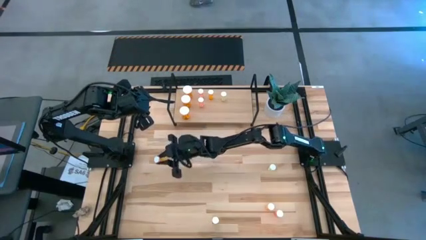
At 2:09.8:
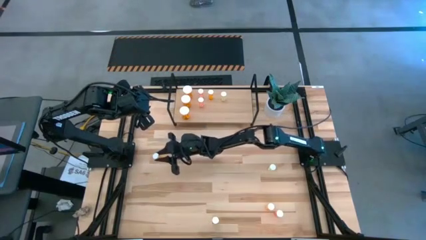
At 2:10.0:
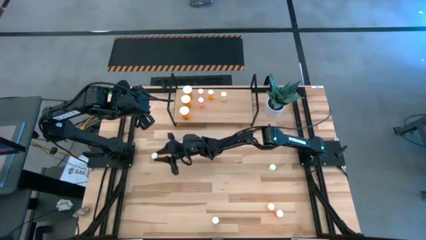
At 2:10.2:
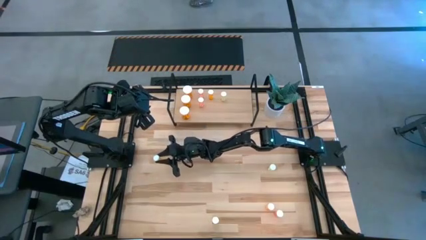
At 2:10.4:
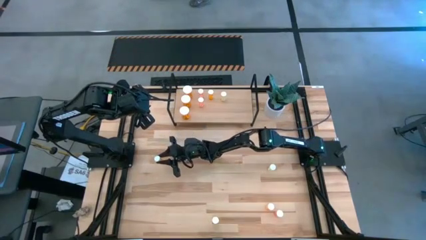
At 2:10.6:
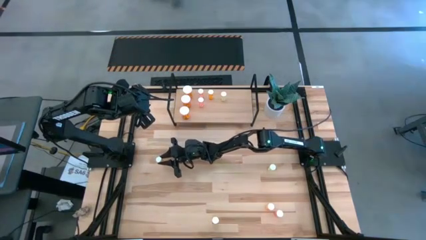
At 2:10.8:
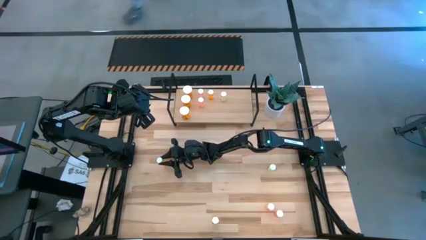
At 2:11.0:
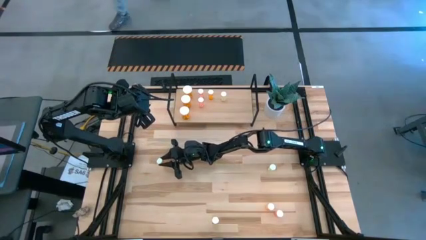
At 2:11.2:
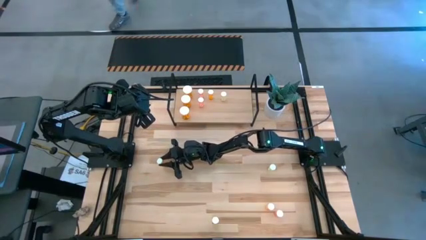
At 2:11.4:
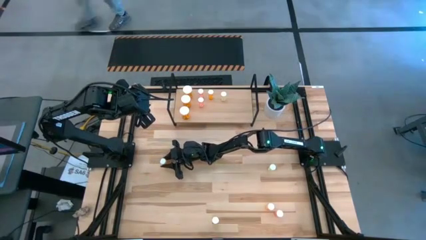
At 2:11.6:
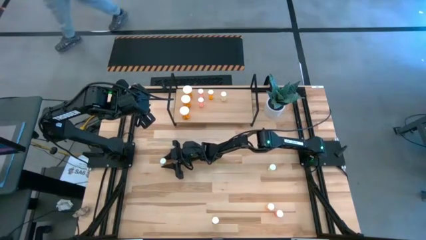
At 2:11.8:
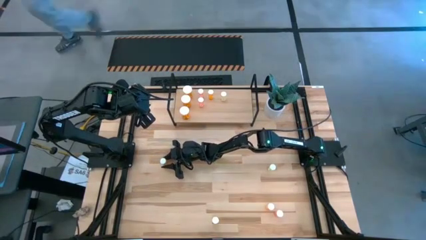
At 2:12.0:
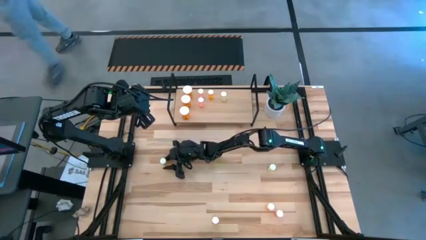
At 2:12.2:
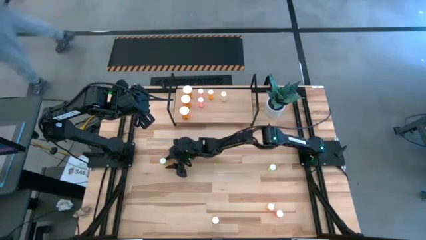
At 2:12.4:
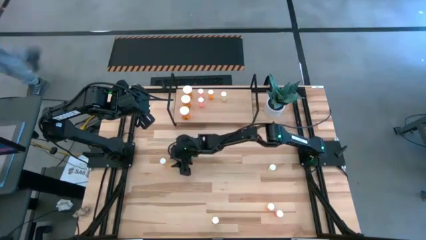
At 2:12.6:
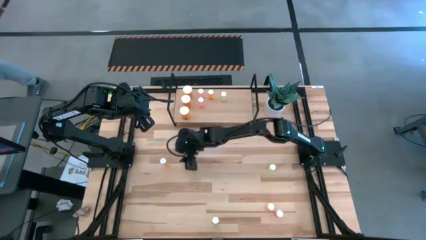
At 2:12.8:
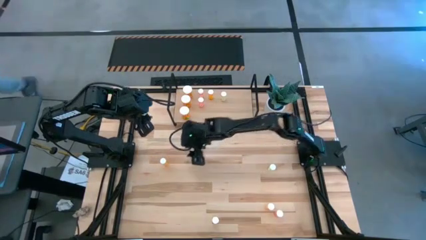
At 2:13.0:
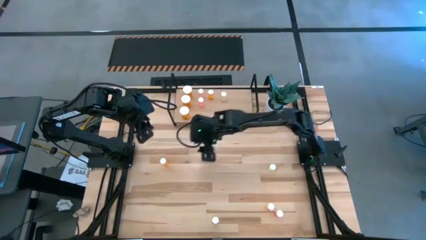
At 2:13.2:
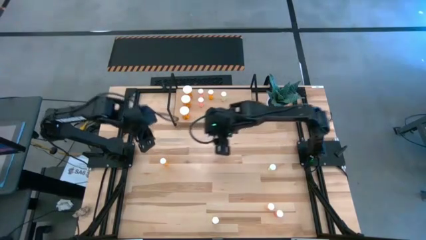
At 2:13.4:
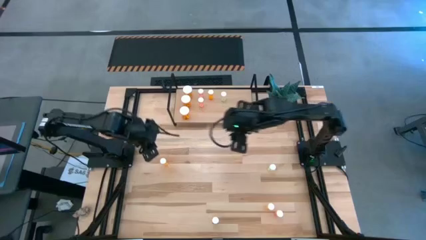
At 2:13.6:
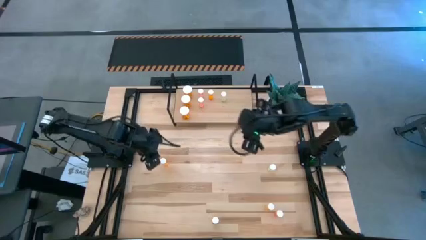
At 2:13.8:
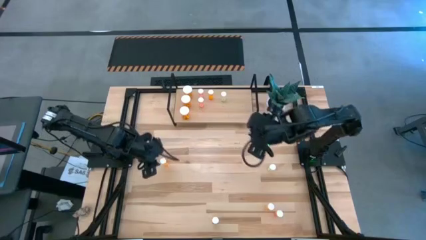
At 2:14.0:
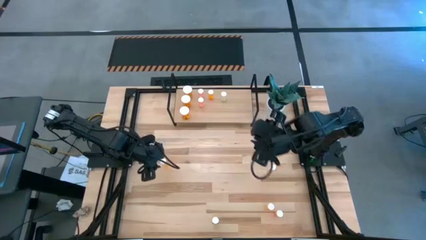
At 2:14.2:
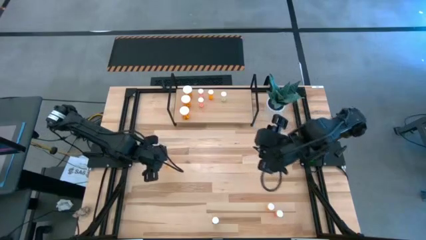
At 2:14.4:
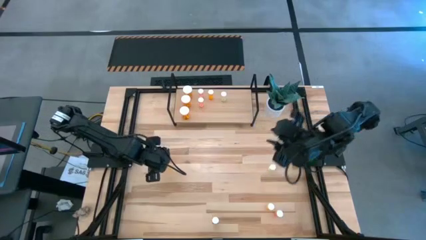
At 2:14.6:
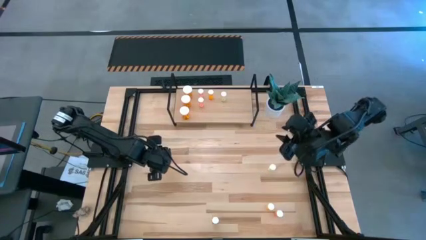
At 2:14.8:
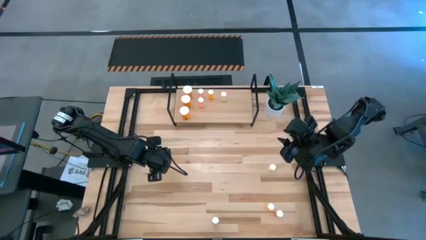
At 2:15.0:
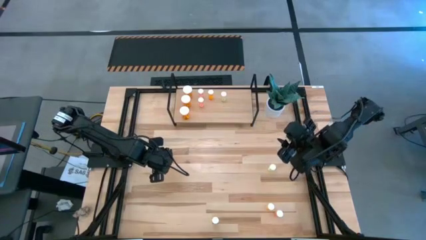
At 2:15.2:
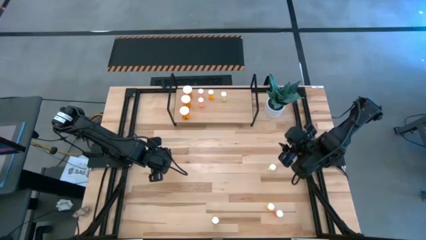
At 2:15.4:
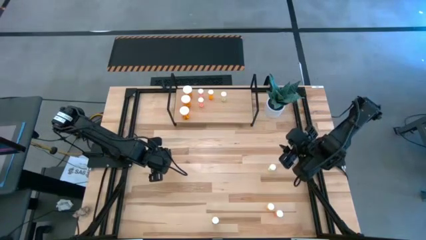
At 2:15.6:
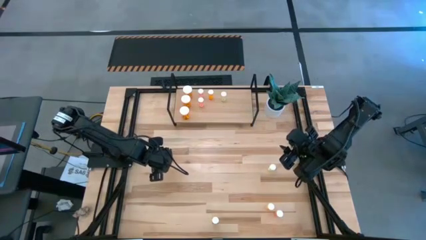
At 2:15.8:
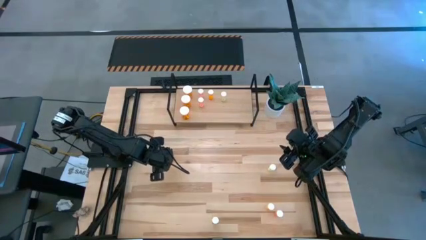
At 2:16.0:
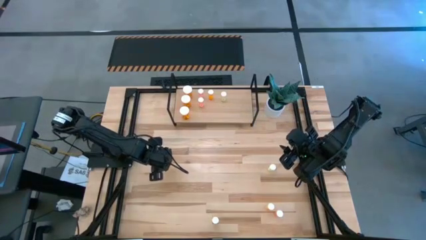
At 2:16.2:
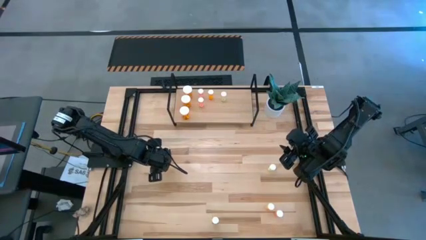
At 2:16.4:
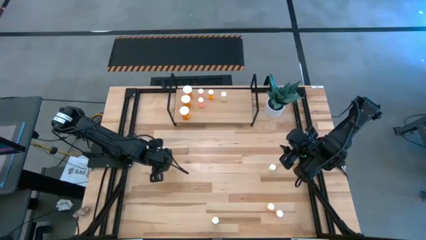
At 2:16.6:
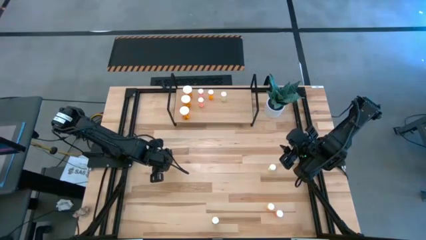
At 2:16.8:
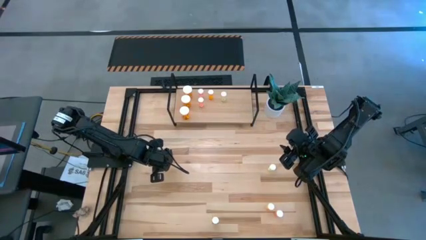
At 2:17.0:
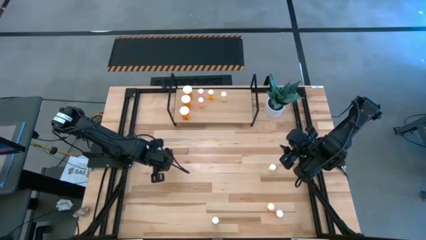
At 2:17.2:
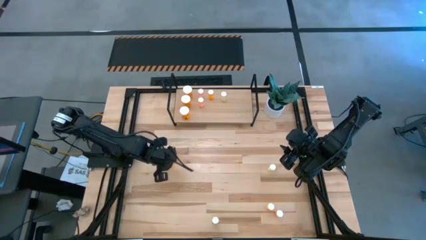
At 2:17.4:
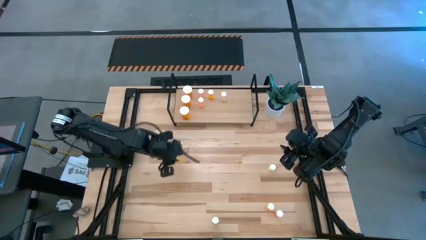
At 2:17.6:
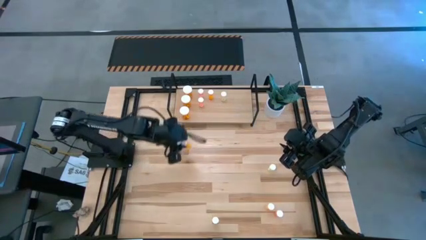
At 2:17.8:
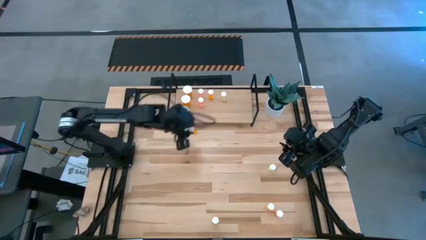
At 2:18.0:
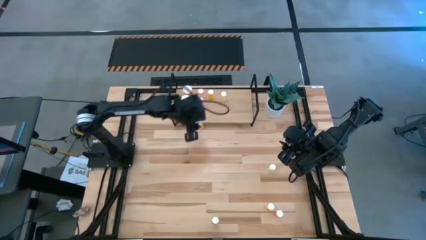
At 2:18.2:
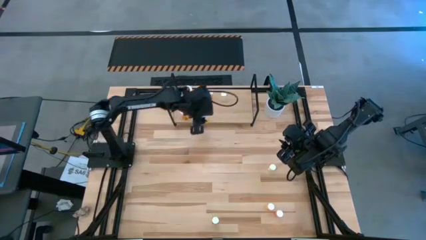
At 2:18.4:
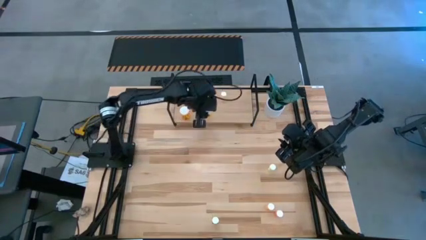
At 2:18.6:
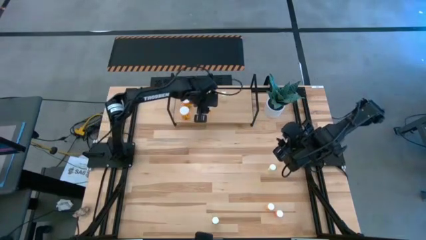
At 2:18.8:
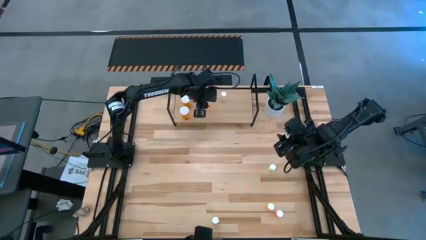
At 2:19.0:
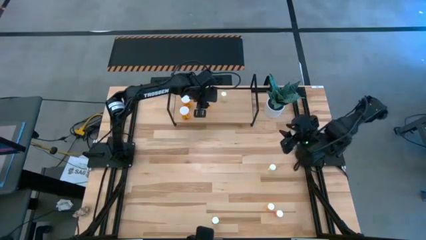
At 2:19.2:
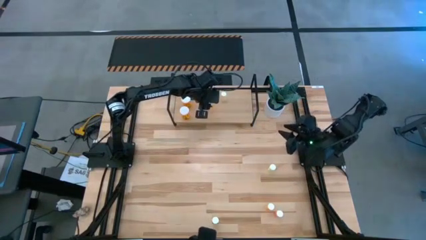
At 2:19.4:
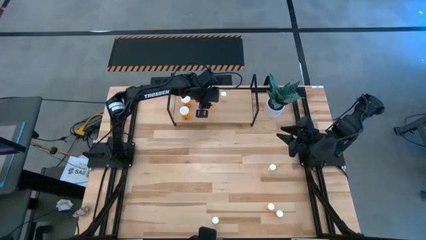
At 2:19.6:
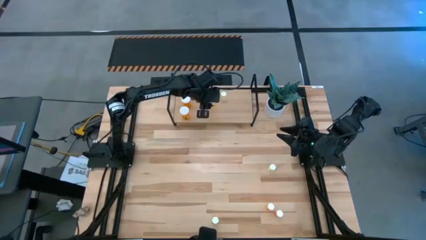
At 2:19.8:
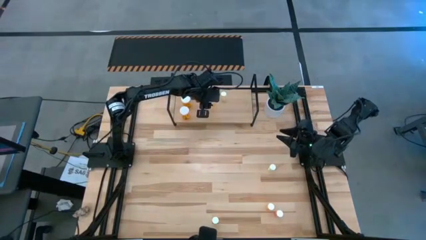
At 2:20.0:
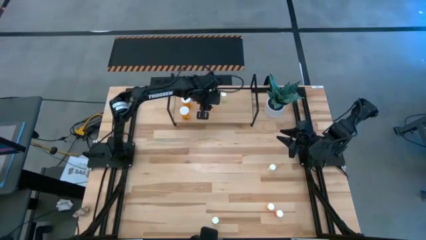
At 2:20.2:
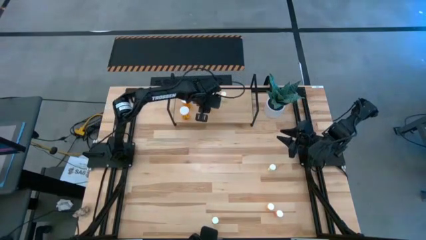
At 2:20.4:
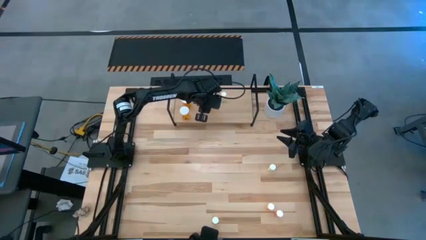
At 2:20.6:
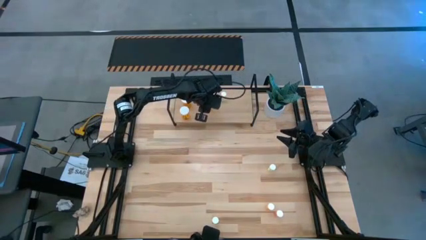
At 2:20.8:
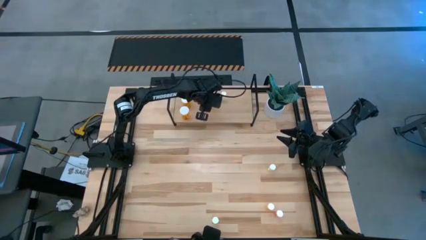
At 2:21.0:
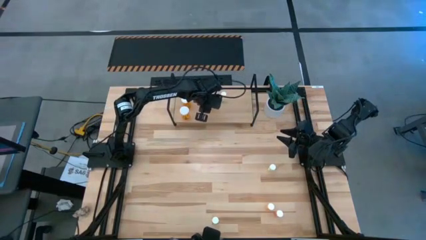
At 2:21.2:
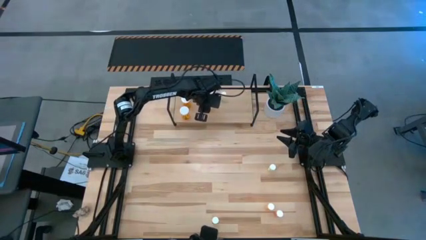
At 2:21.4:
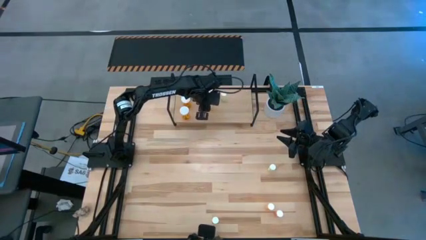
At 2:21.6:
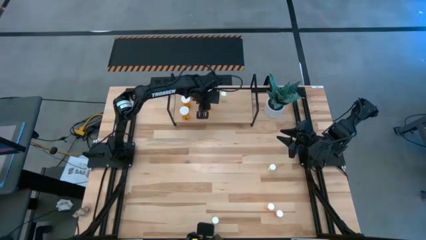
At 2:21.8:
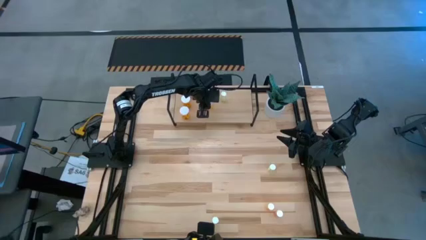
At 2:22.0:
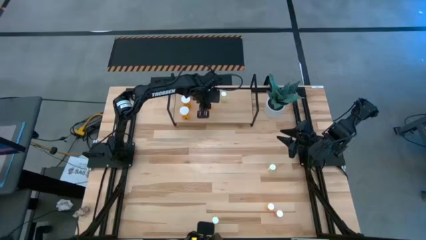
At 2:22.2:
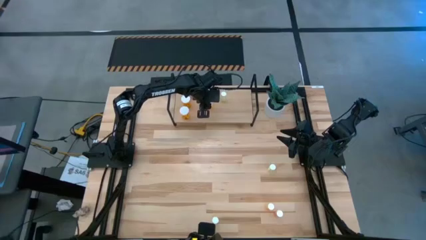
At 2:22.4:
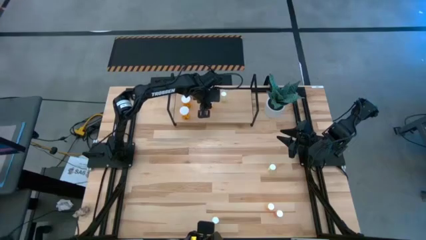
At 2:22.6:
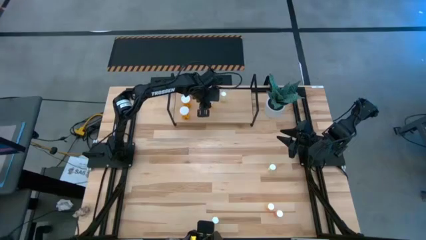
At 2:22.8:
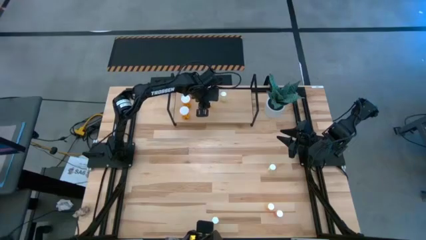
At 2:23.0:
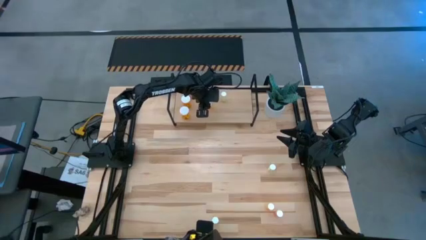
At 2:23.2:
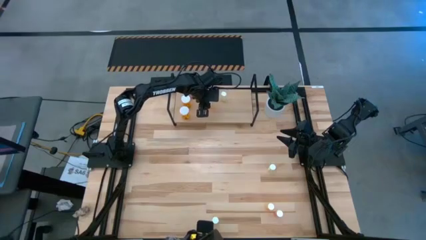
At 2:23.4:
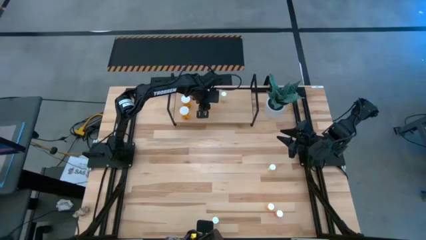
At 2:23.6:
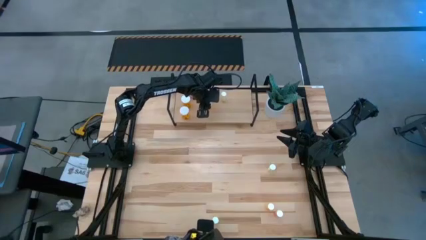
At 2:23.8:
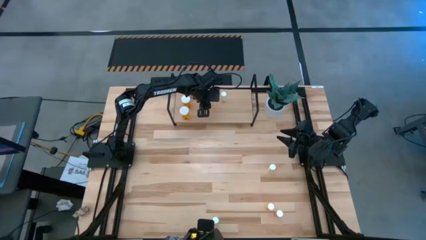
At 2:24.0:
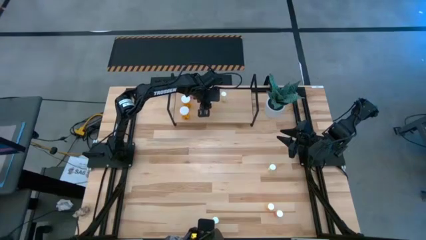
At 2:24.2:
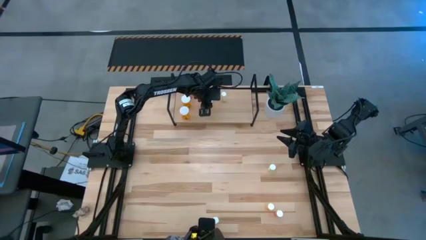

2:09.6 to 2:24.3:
Task: Pick and place medicine bottles onto shelf by color
Put the top small orange pill bottle on the shelf aligned with the other small orange pill bottle
